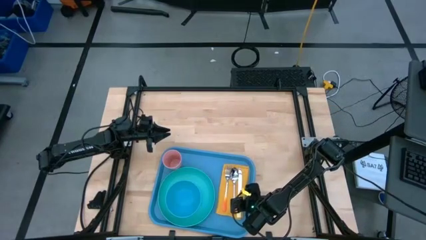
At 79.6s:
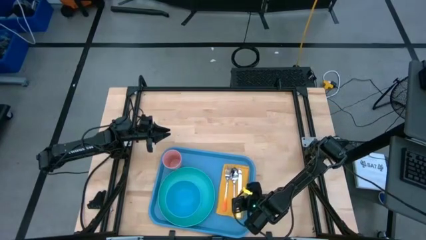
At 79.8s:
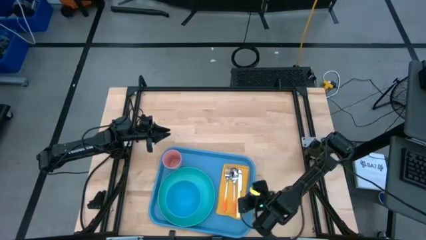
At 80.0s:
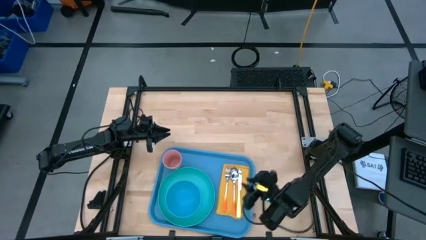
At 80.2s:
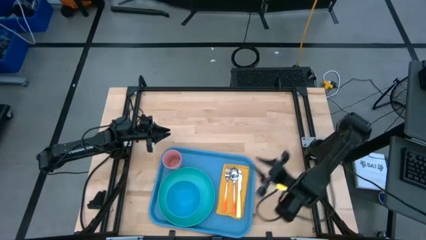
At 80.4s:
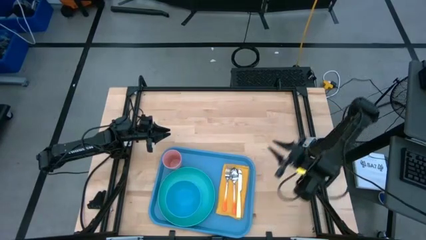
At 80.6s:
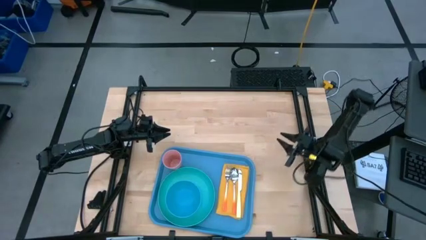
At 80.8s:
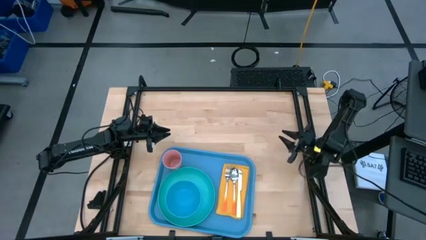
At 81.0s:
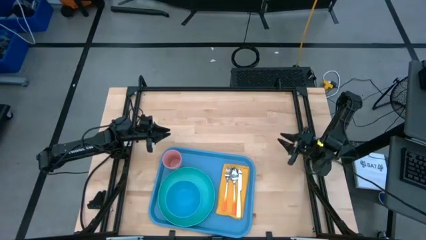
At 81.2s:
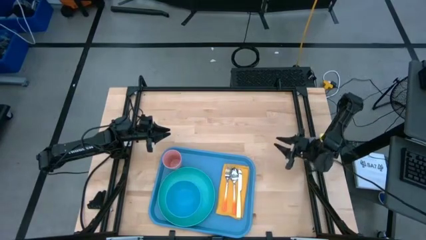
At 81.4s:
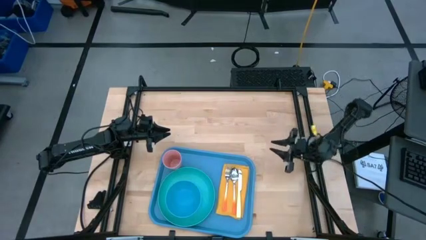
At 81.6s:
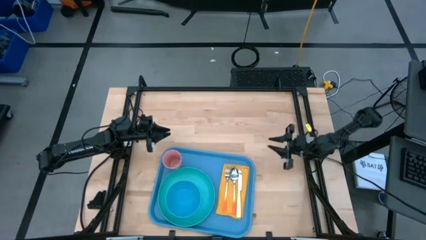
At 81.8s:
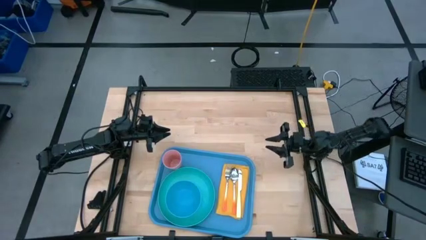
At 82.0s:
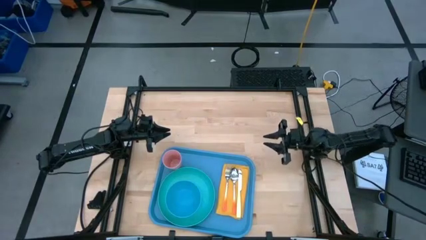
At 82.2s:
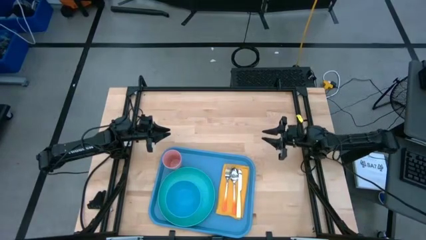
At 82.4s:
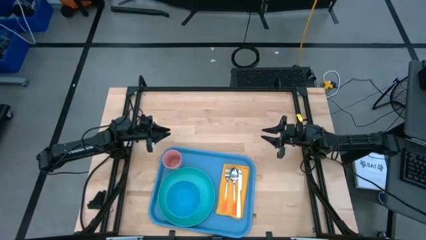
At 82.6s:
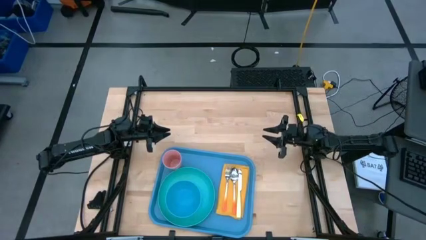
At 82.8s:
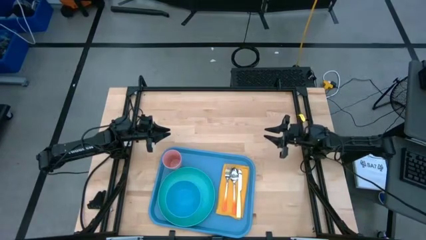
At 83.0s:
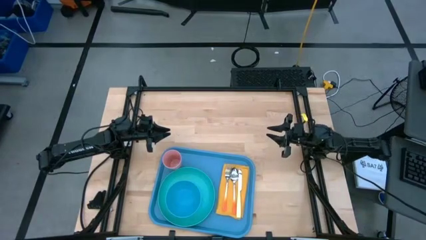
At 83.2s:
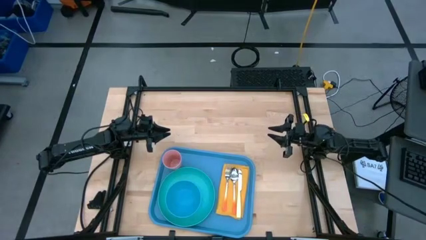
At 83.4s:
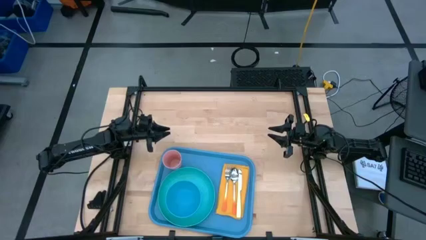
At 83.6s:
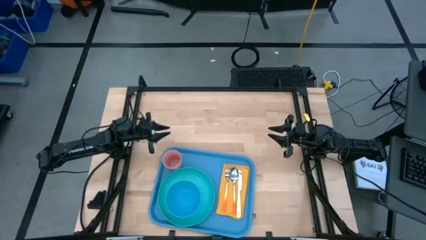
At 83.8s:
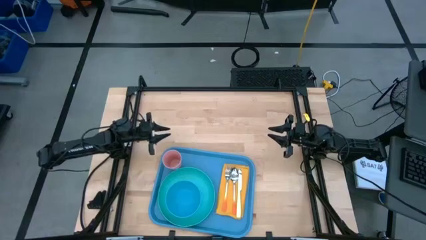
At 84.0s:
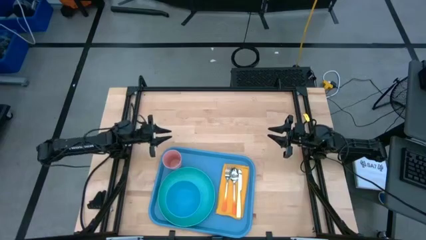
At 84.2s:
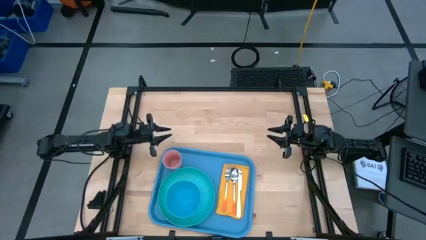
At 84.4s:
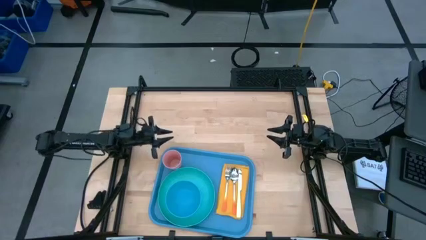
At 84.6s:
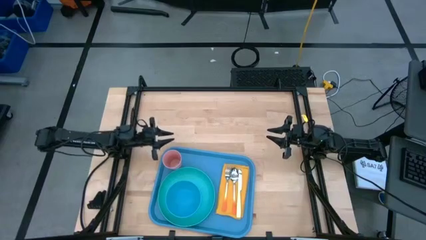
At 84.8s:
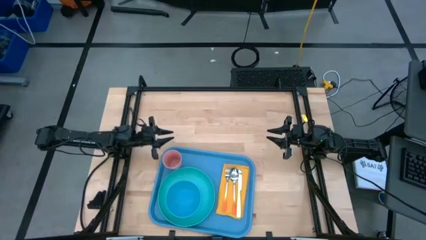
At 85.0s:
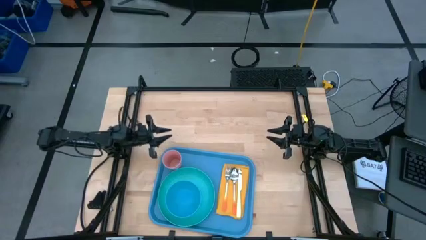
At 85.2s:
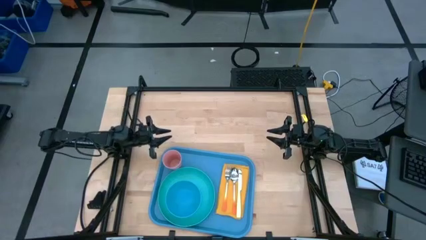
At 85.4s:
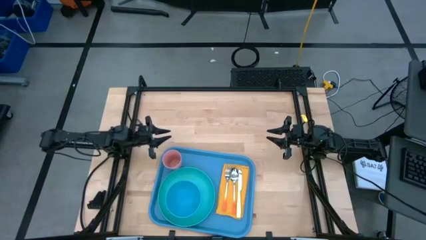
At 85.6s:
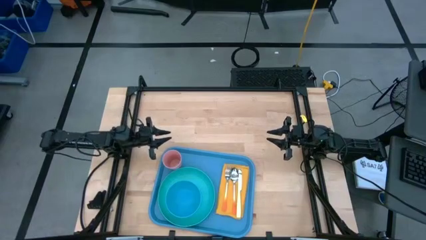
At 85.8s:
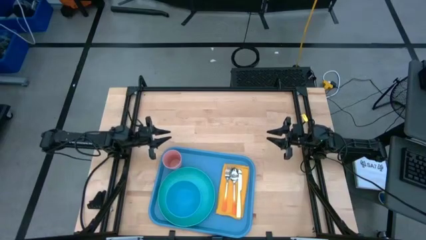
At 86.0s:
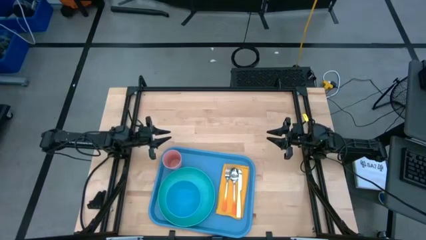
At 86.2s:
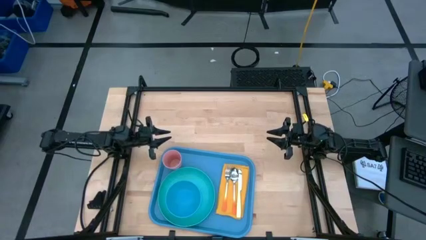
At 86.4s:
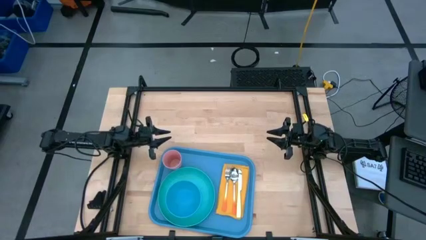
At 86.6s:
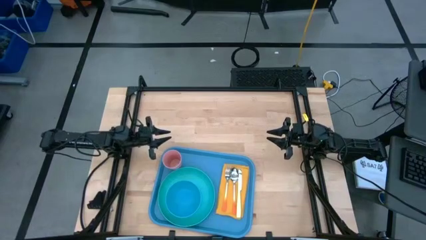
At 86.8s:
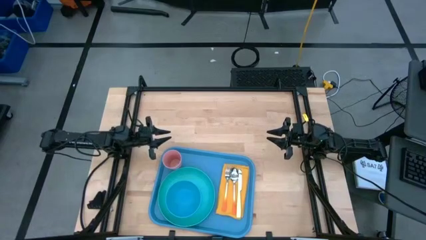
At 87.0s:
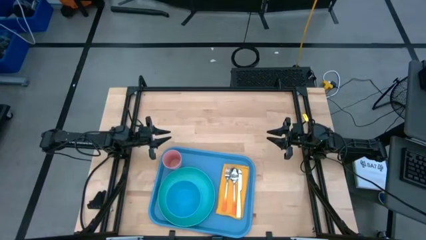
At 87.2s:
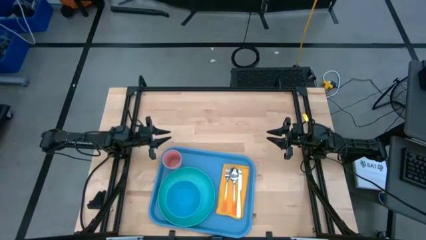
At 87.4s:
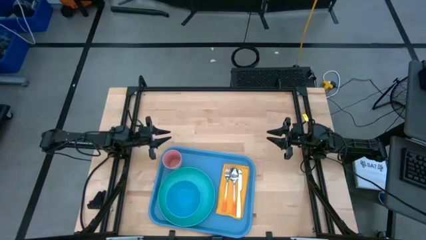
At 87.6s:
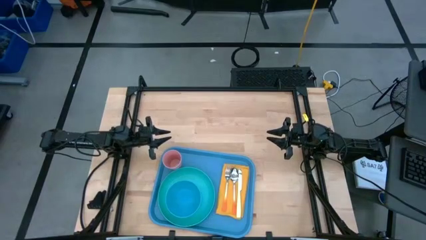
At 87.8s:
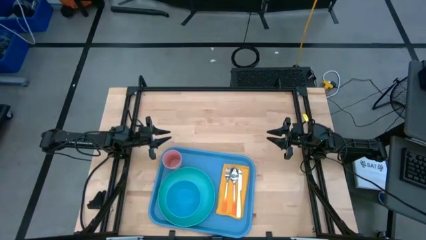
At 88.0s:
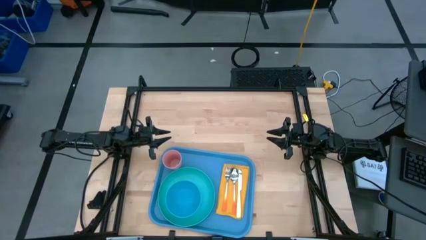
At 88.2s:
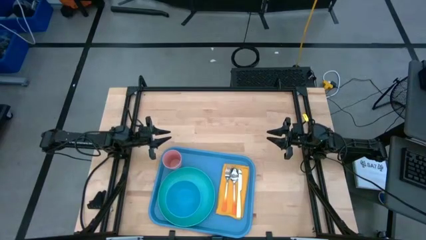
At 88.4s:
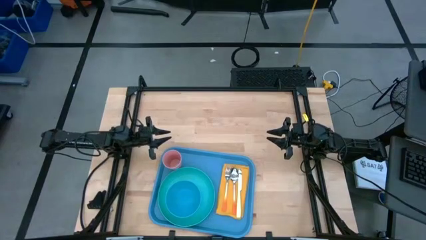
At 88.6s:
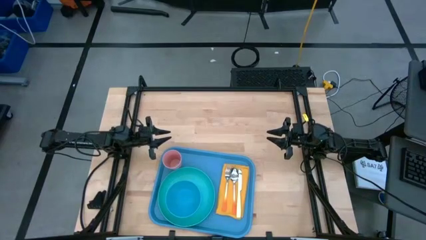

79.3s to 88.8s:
Task: Set up tray
Return to Home Position

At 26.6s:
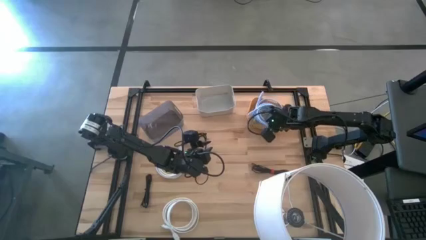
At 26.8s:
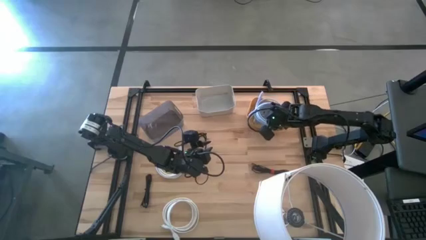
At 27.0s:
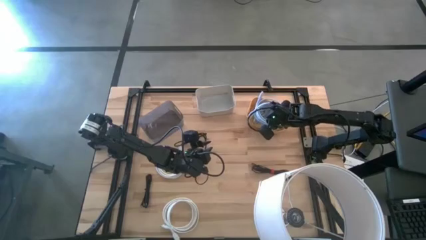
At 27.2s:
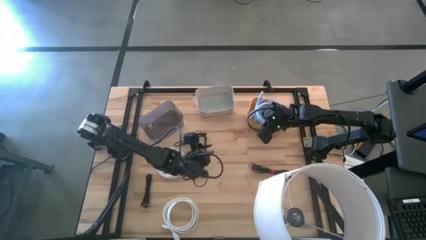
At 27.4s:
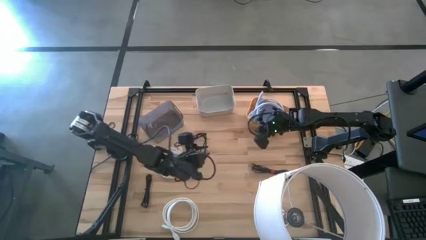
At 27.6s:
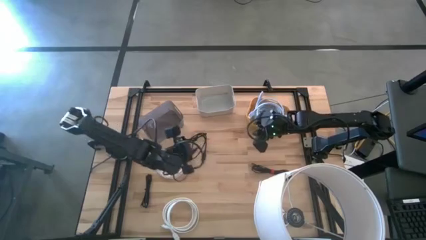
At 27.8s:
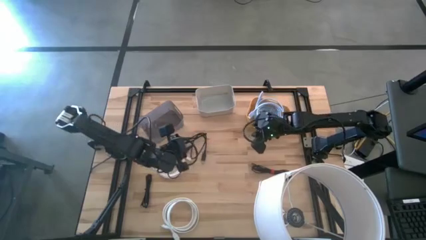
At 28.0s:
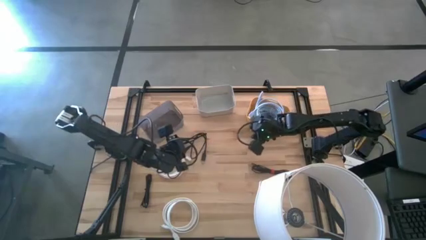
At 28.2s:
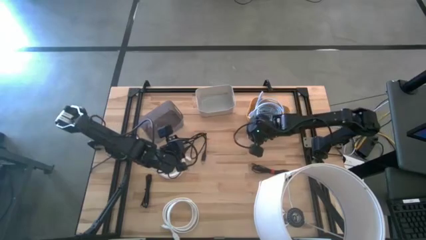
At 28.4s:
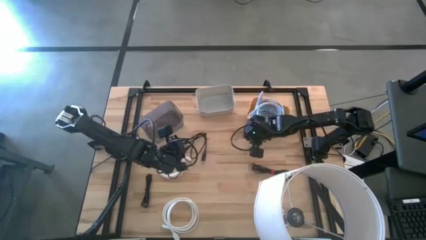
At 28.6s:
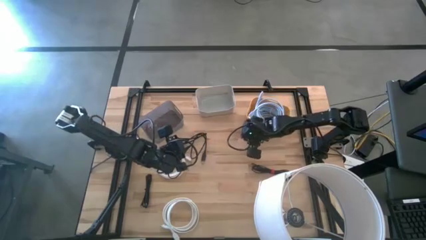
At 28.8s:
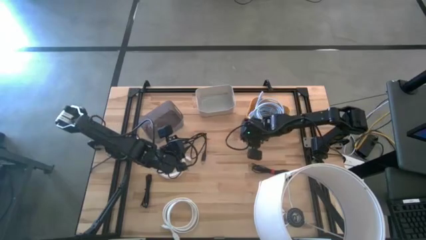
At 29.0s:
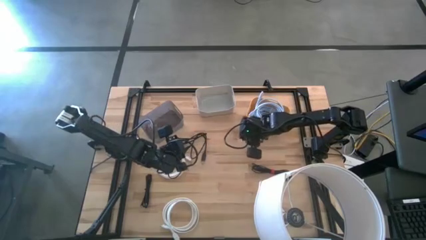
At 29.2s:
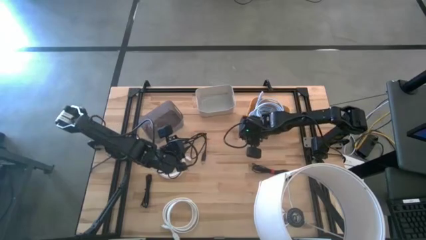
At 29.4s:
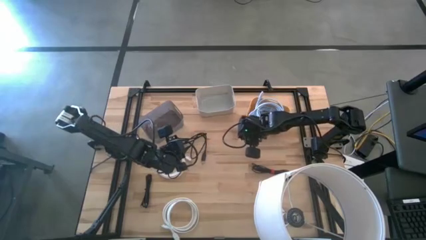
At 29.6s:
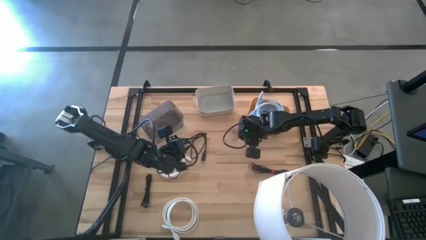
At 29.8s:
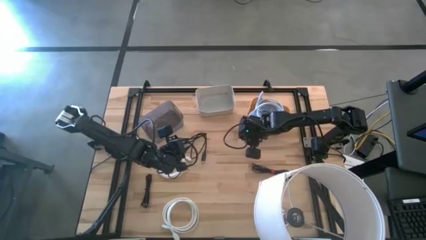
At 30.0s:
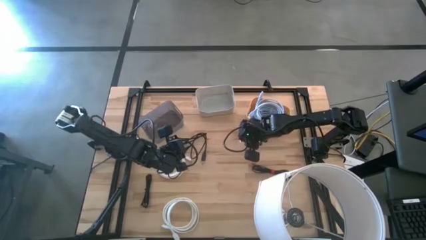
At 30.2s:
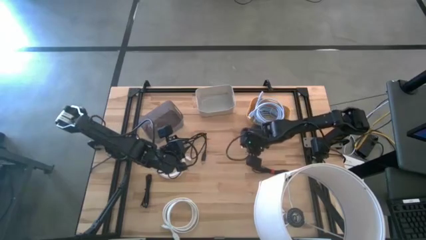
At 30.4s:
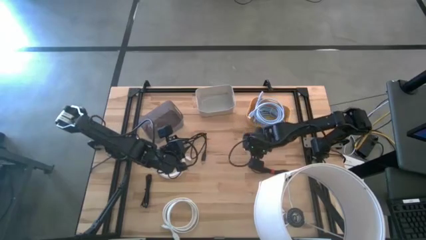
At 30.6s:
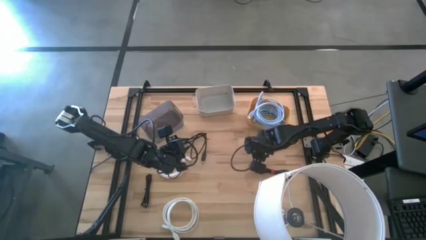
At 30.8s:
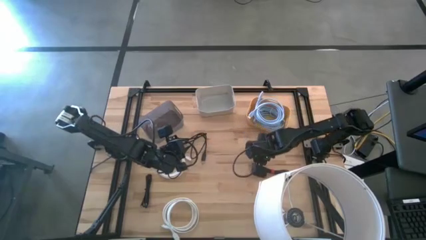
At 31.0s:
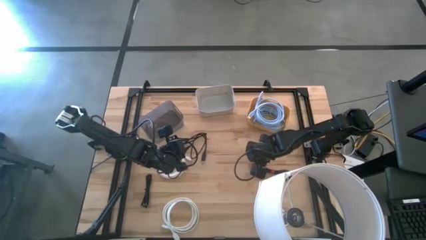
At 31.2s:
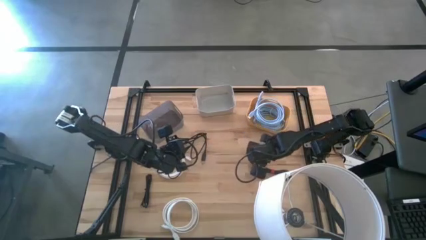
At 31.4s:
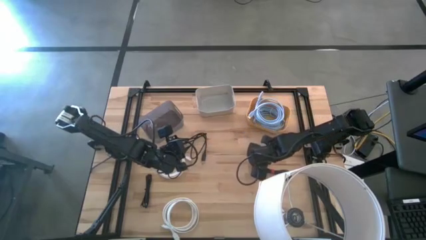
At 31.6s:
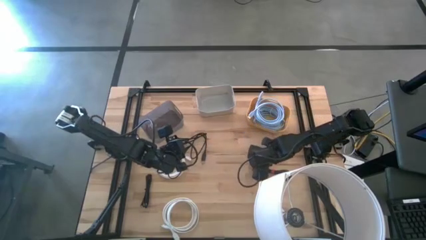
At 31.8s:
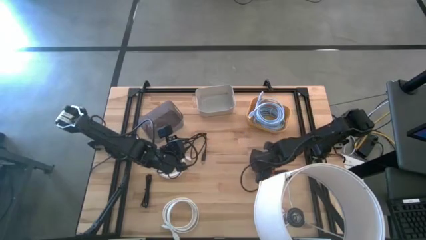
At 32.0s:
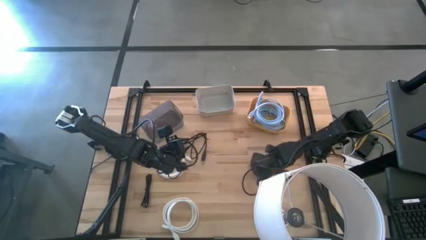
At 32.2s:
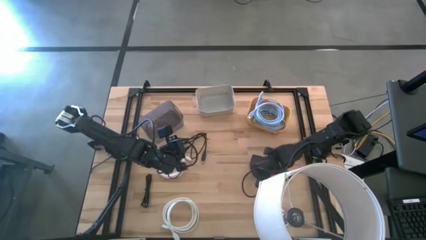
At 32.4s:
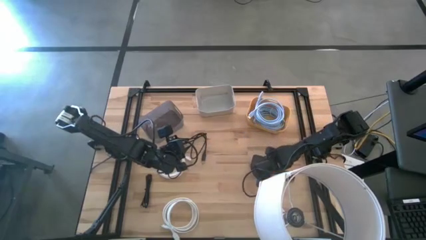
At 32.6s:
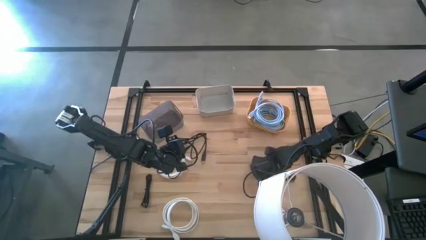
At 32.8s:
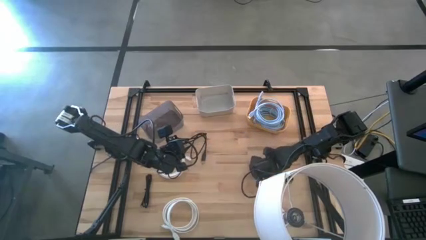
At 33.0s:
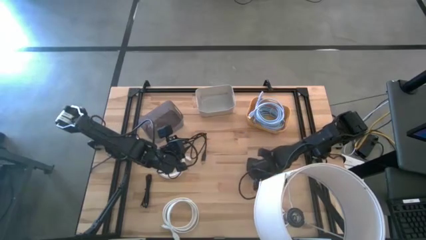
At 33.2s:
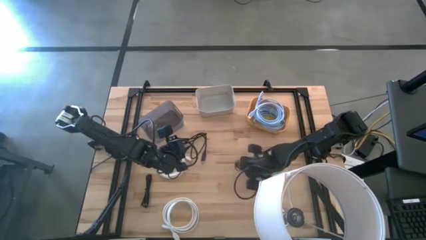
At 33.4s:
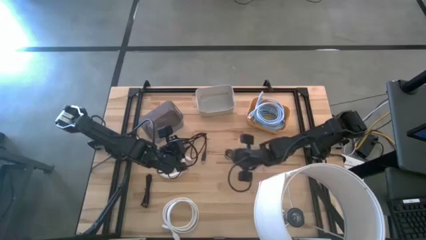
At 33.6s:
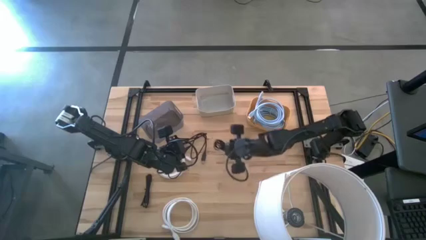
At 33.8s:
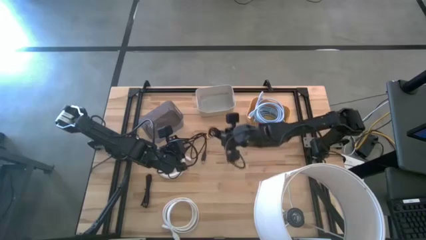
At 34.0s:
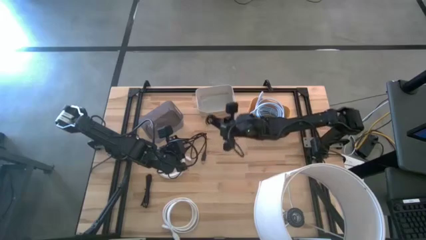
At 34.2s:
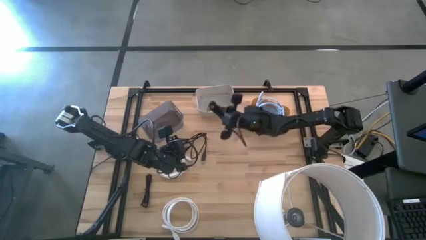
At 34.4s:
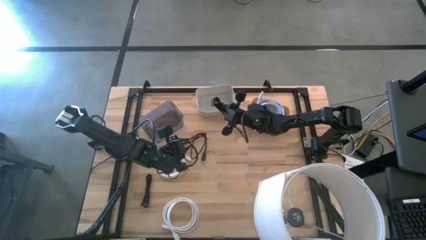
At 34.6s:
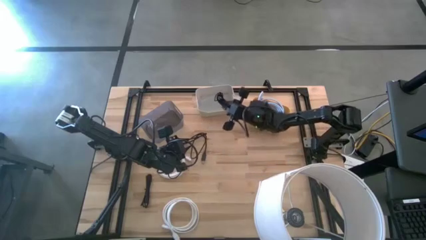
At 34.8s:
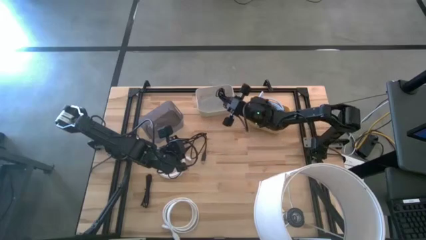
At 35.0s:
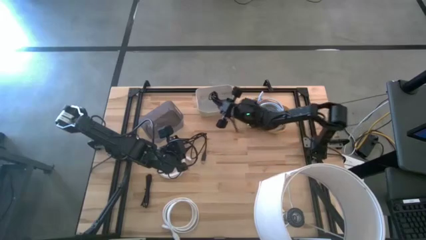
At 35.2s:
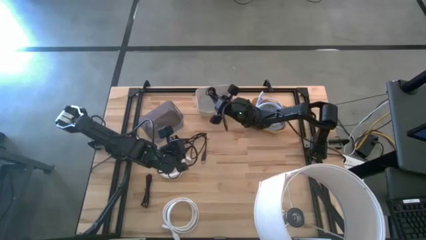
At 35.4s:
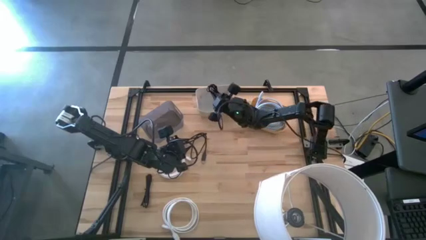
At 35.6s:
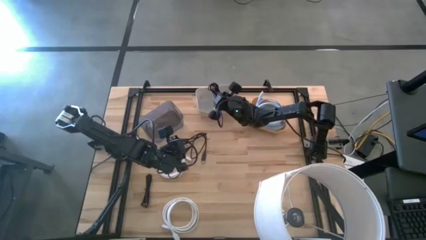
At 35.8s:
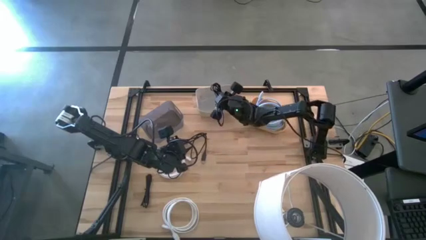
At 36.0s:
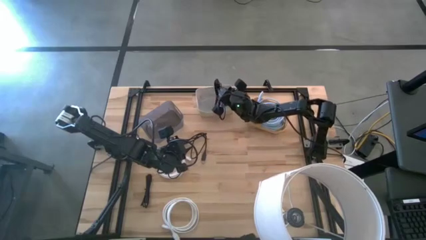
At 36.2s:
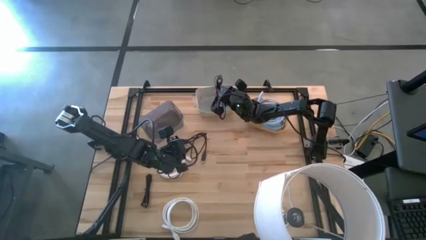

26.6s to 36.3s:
Task: Pick & Place USB Port
Put the right black usb cable into the white bin
